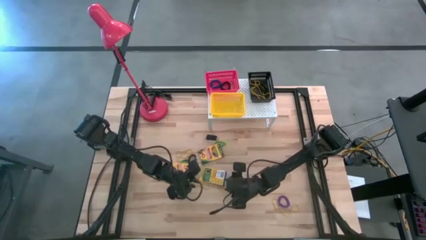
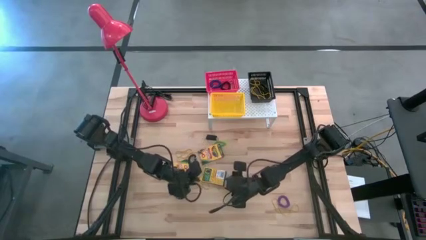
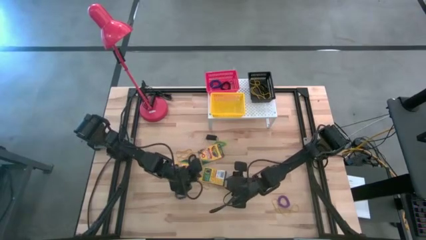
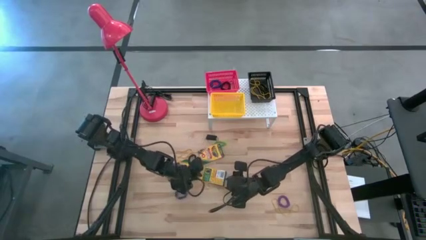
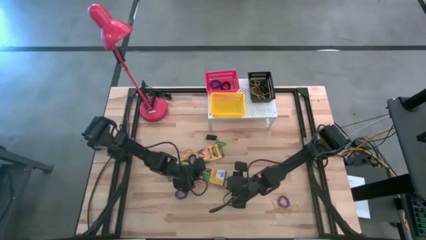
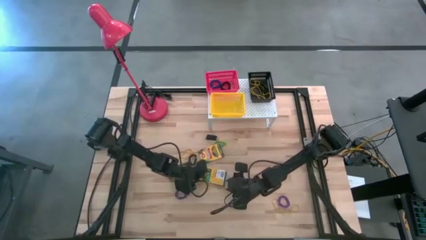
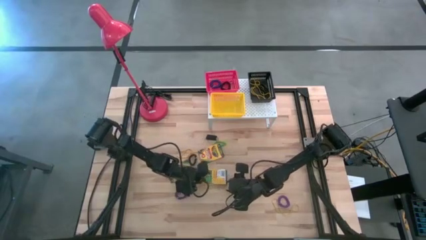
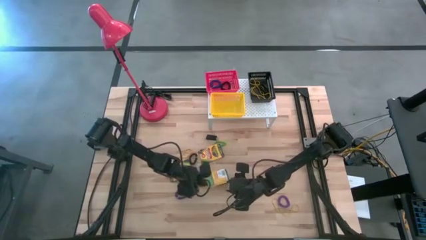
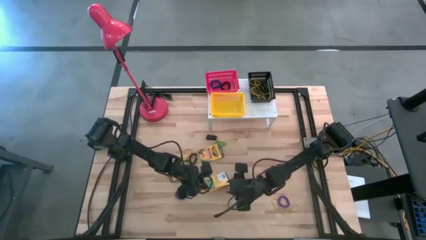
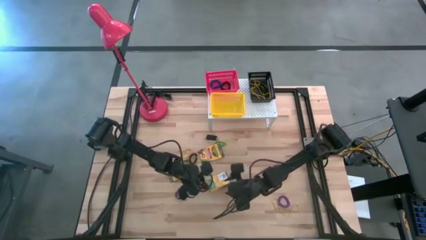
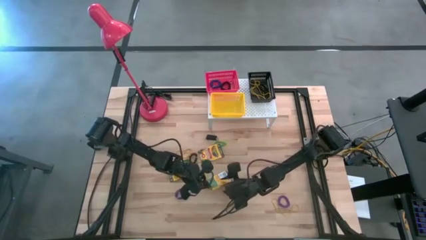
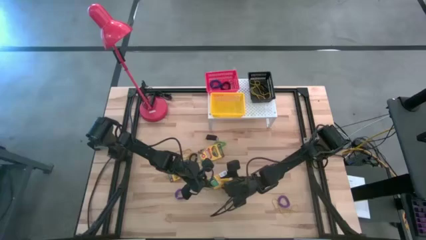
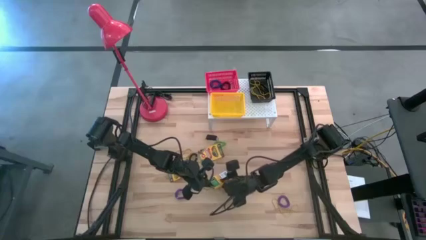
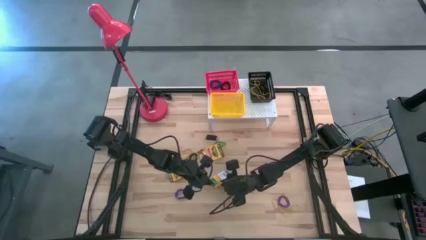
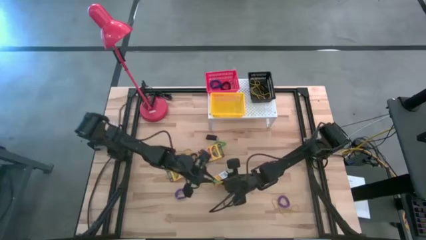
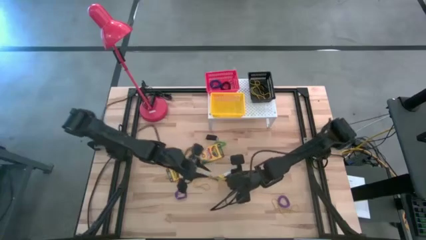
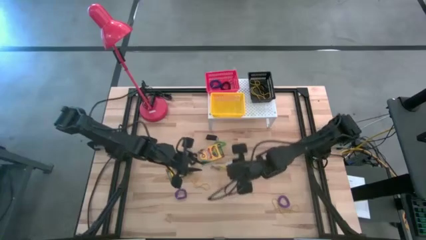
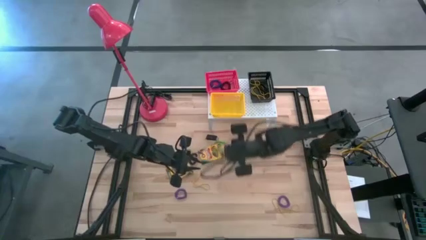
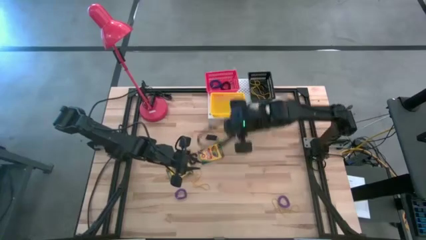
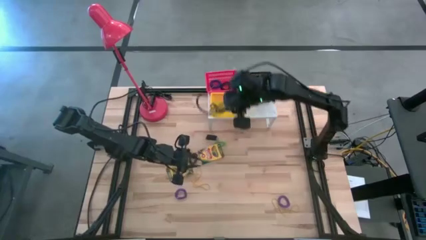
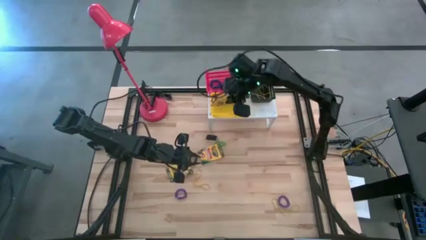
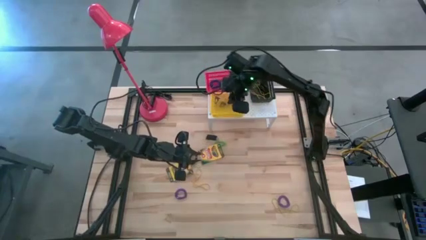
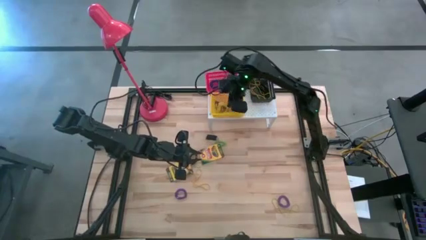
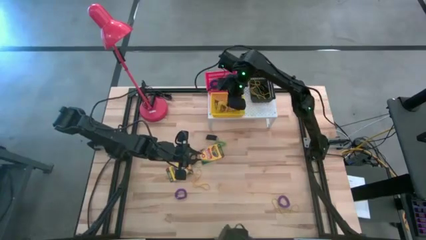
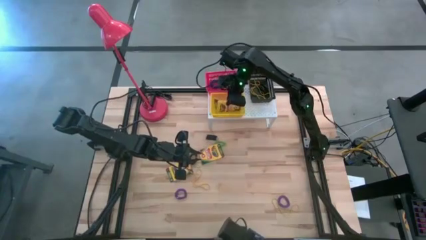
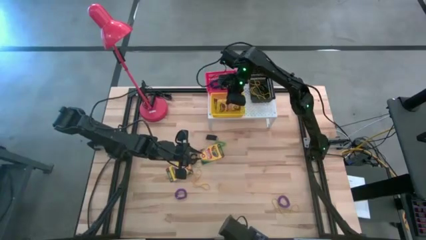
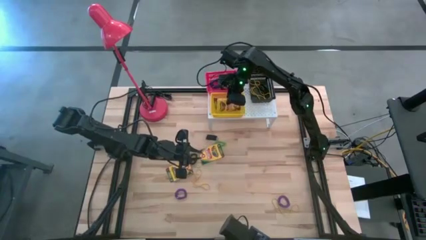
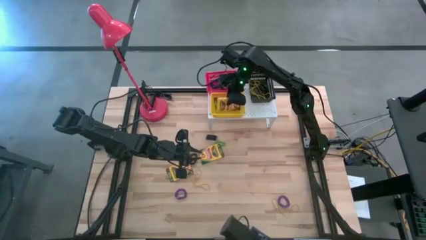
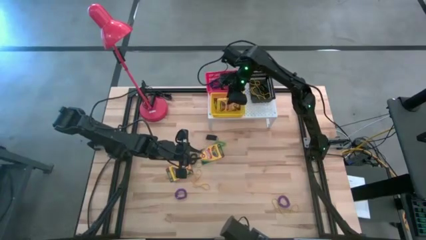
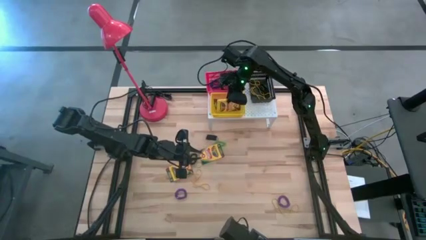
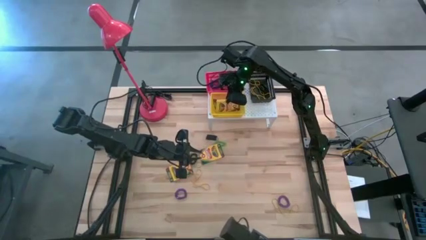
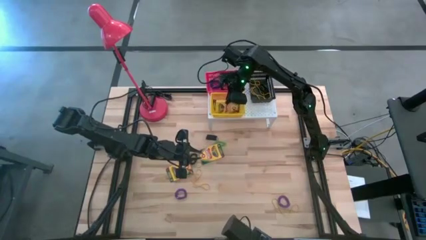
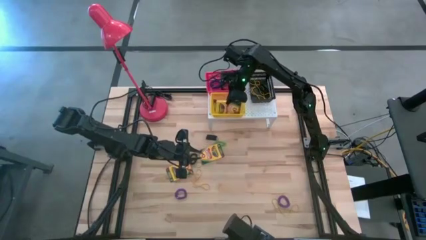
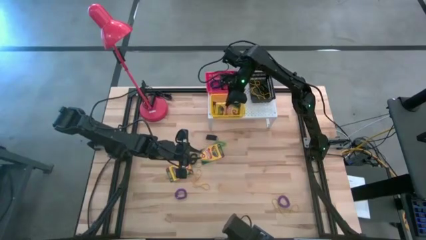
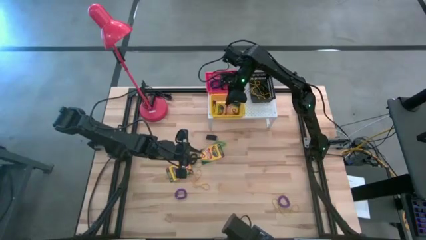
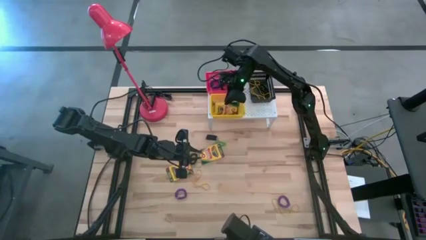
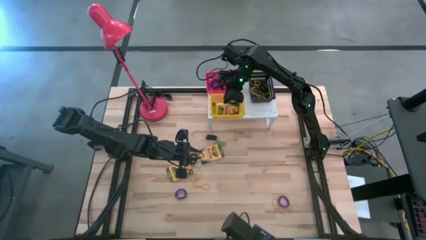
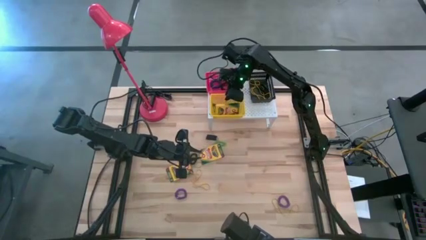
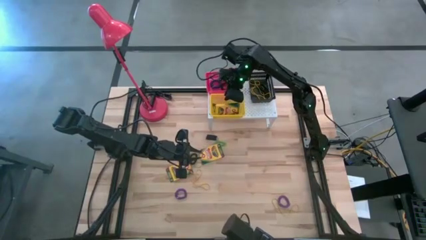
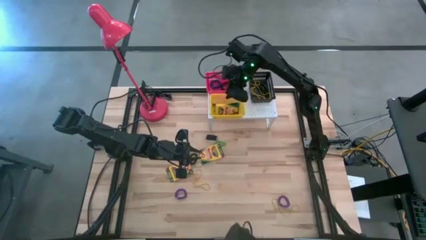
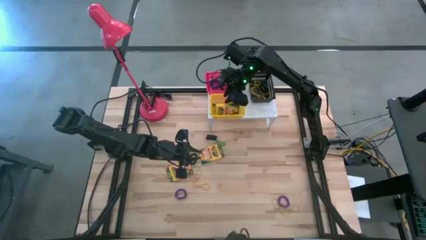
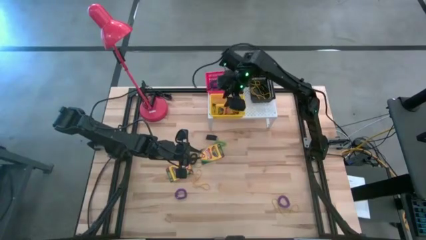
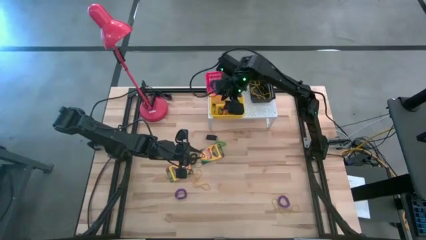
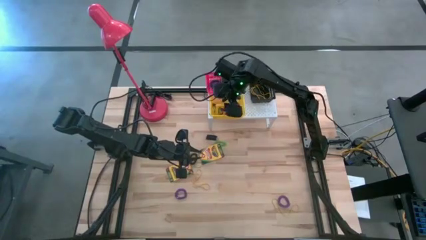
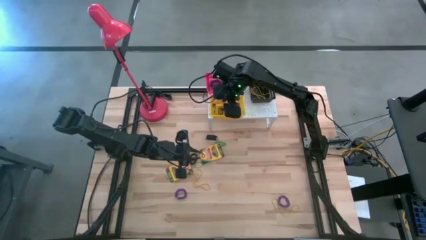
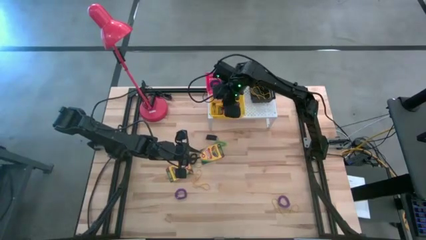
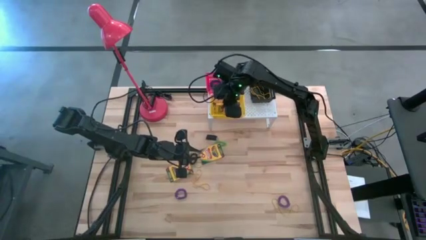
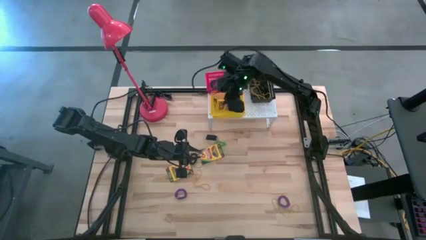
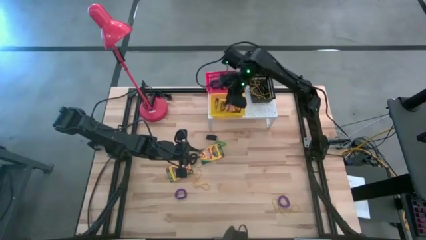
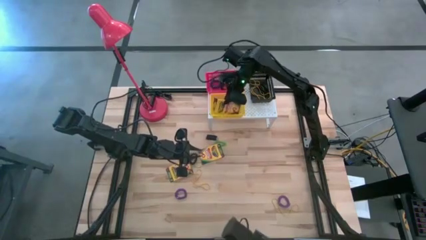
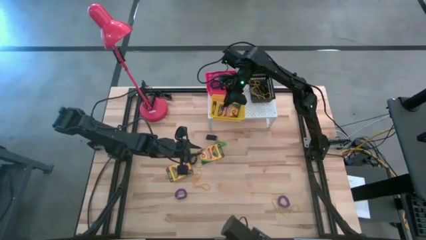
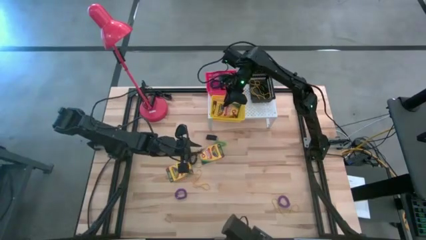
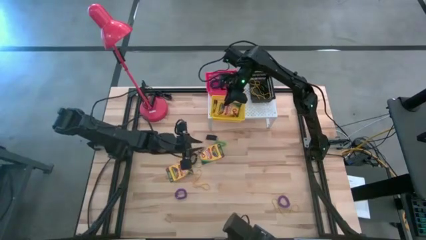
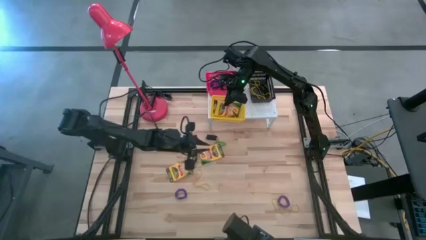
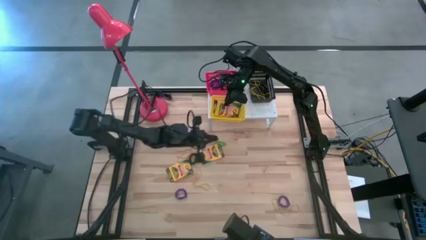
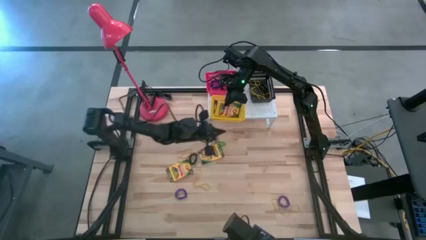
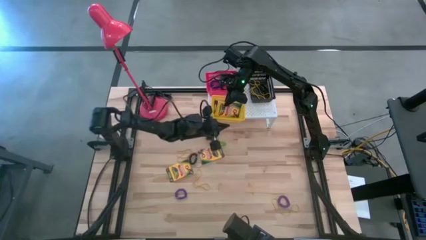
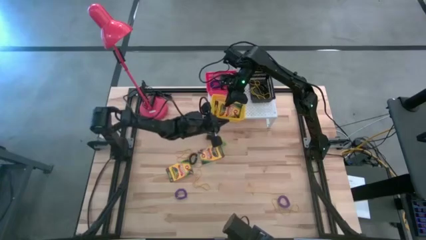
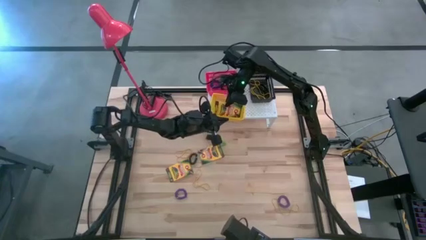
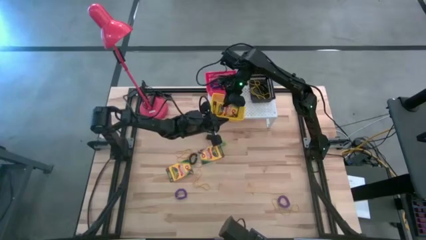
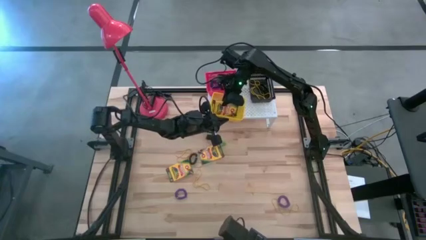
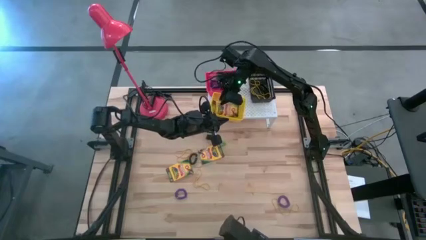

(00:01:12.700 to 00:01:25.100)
Task: Pick & Place Office Desk Supplies
Put the crayon box into the yellow bin on the shelf

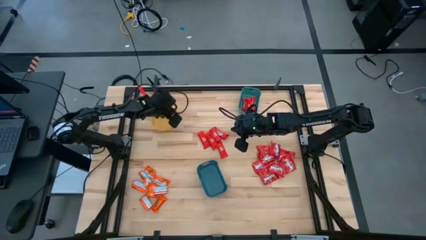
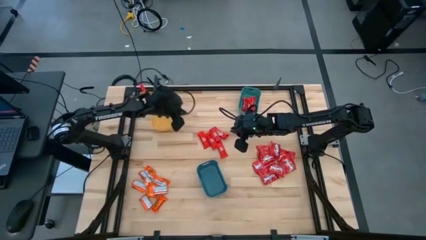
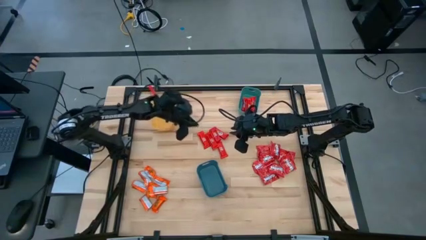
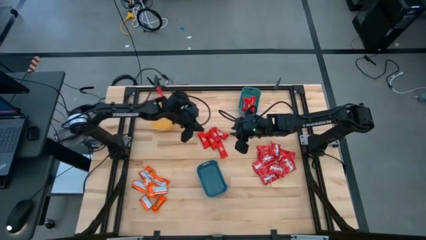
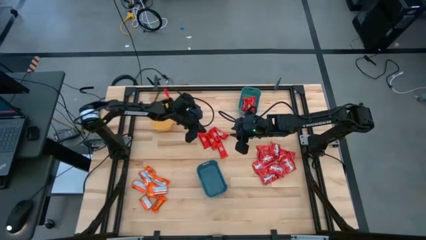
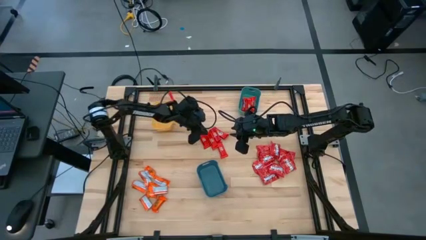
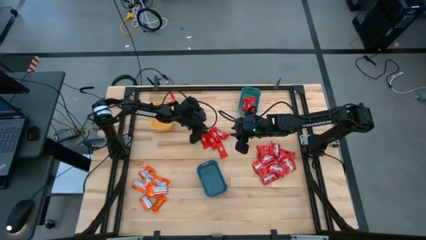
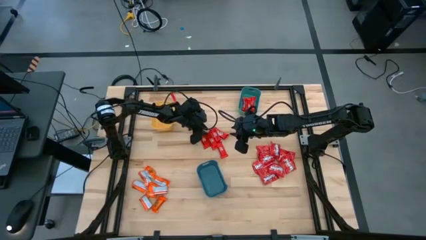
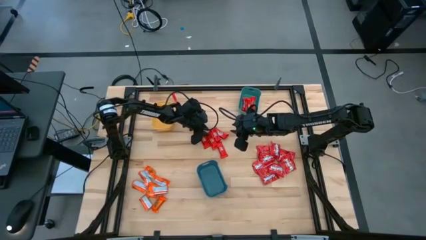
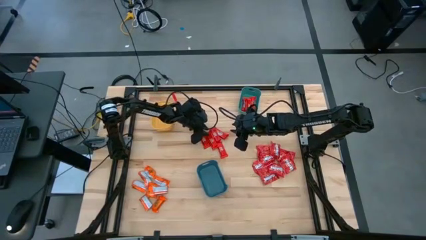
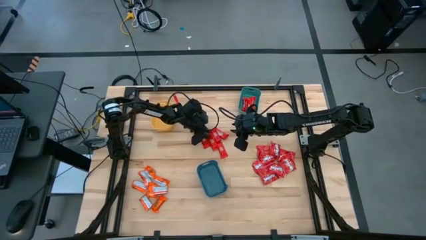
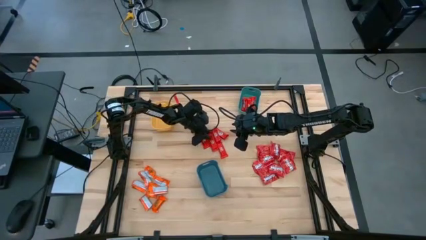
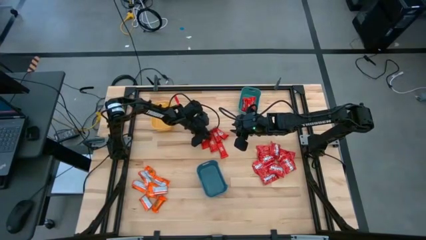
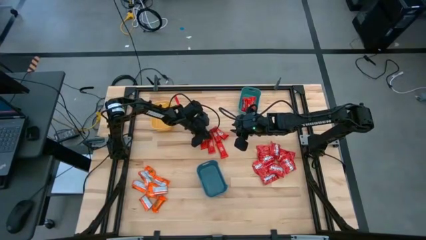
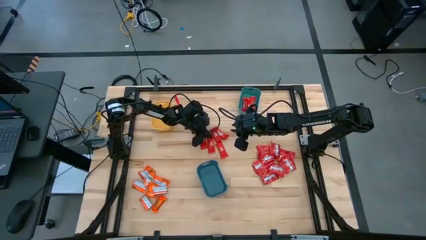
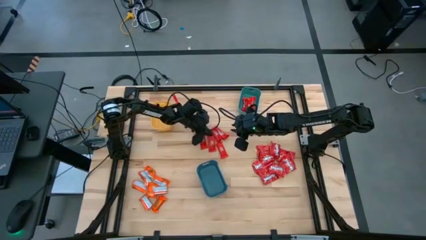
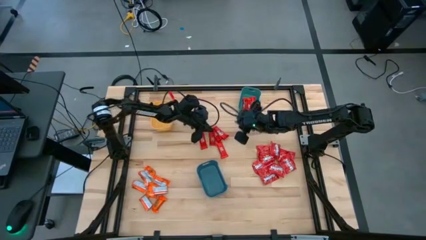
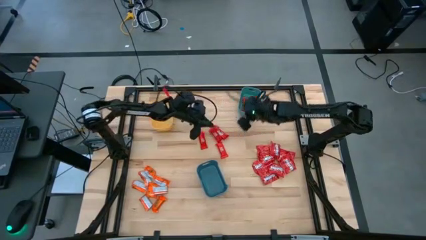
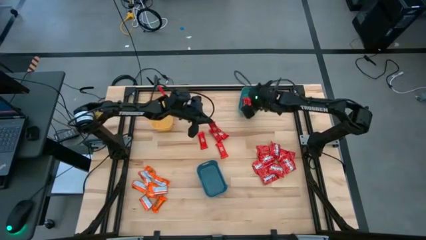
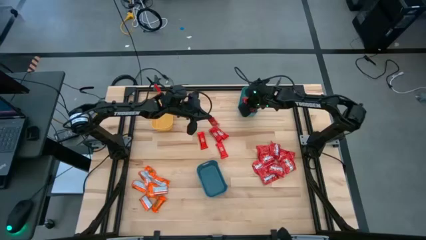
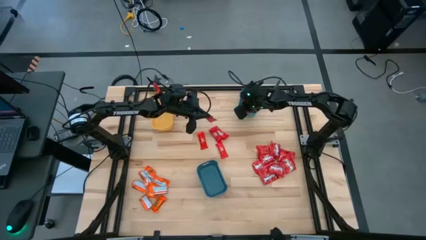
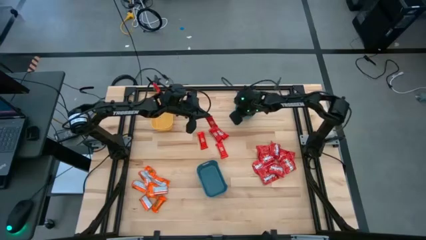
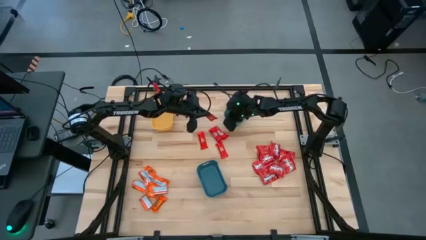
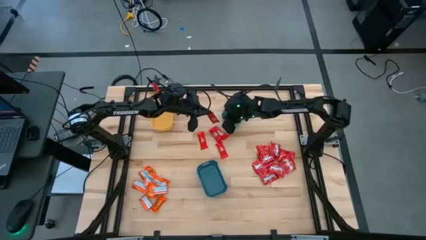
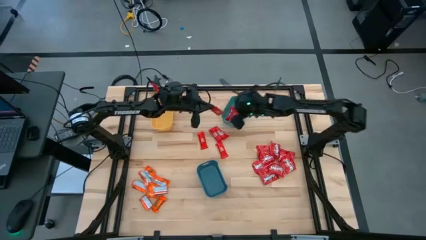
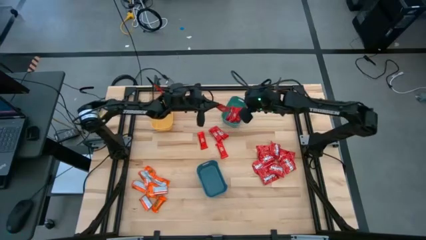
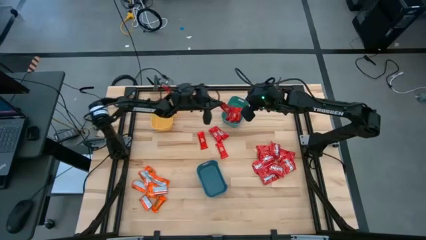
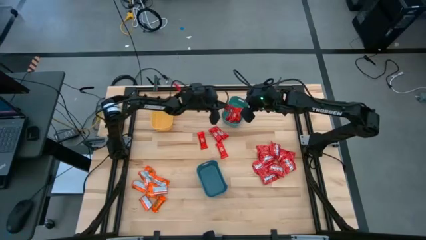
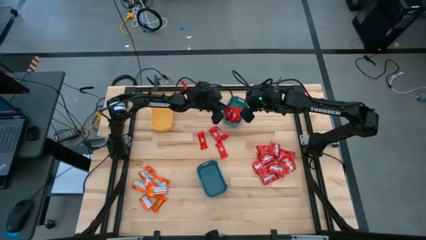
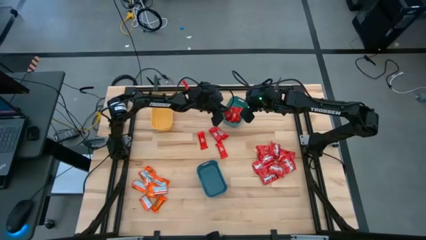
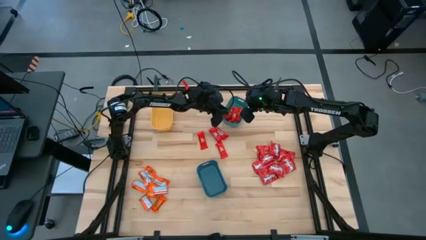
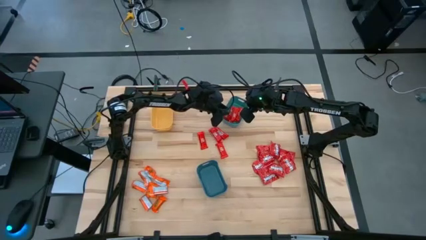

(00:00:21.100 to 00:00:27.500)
Task: Sort candy
Put the red chocolate bar into the green bin
